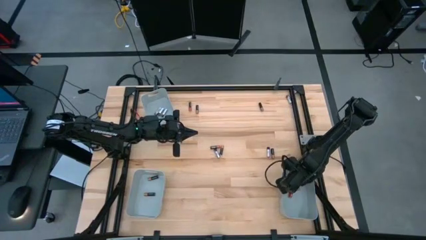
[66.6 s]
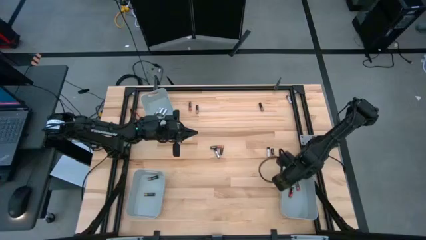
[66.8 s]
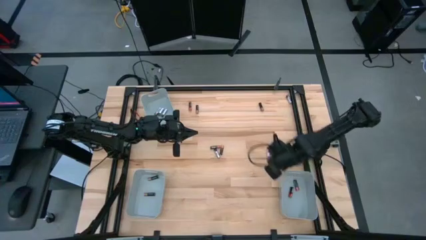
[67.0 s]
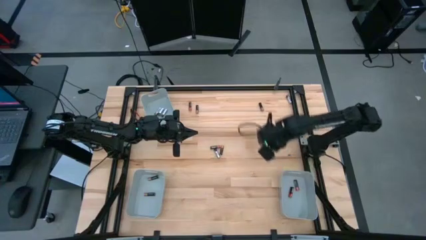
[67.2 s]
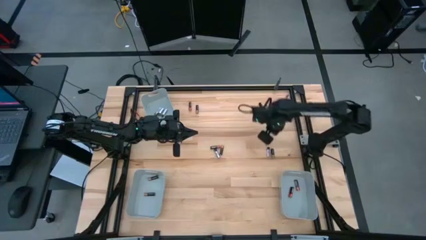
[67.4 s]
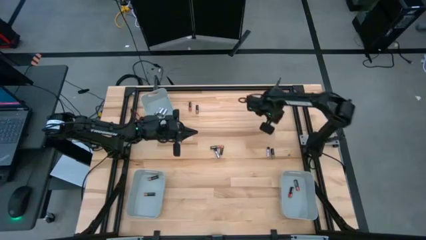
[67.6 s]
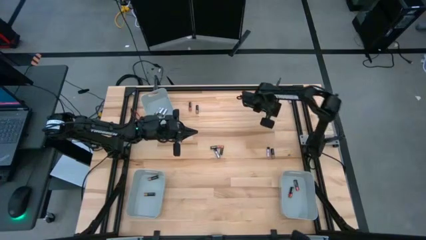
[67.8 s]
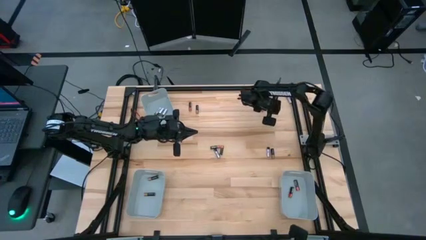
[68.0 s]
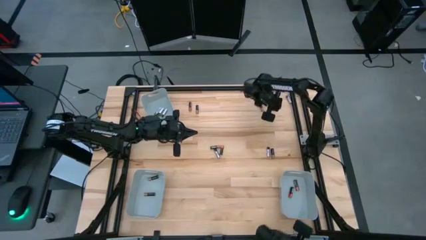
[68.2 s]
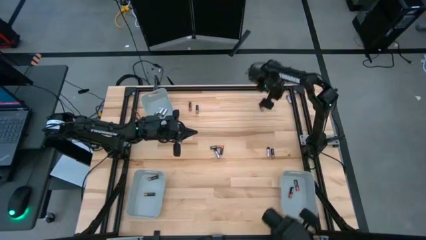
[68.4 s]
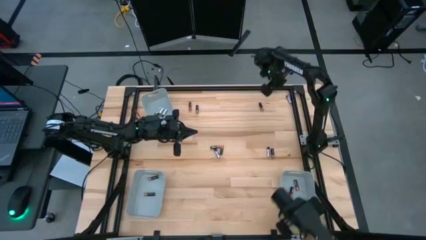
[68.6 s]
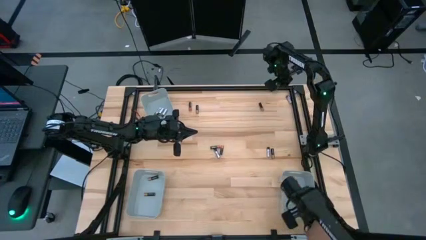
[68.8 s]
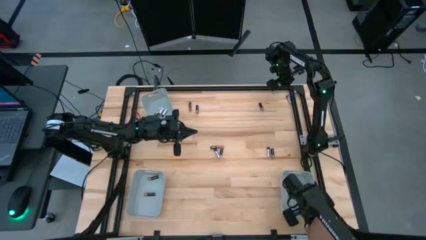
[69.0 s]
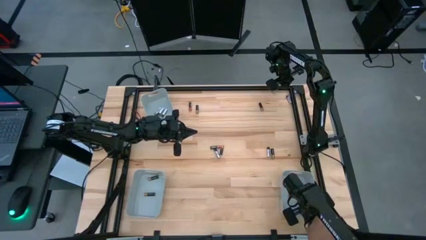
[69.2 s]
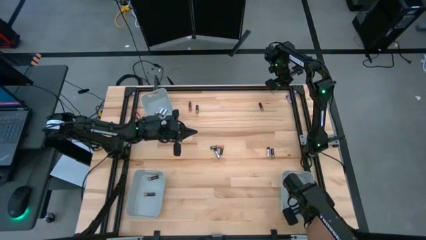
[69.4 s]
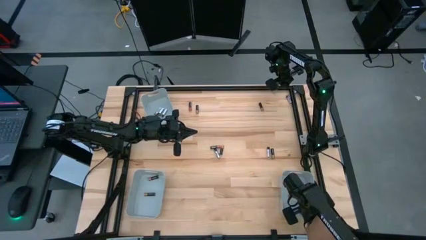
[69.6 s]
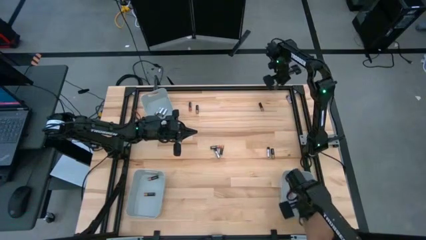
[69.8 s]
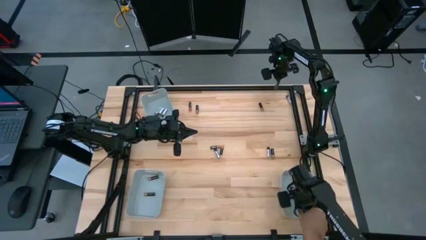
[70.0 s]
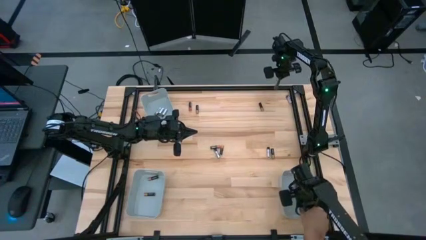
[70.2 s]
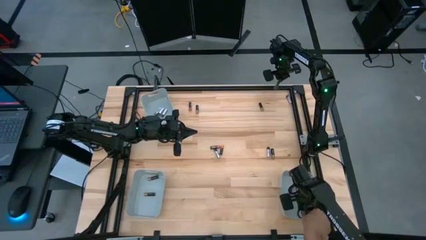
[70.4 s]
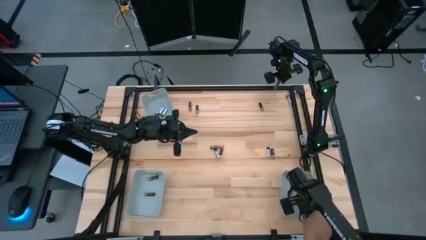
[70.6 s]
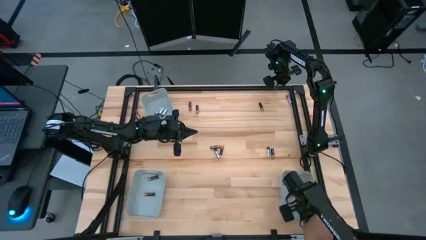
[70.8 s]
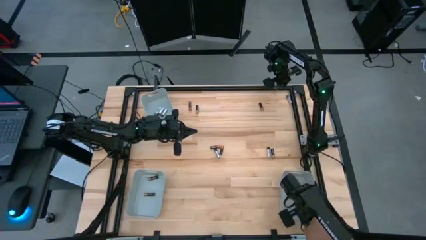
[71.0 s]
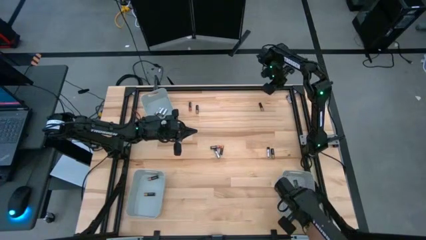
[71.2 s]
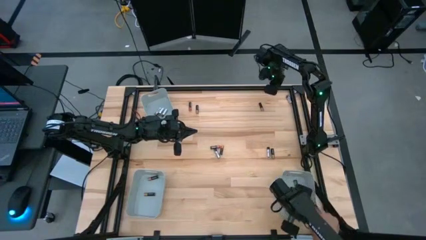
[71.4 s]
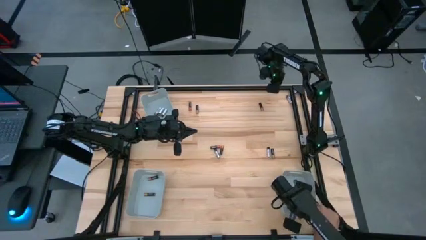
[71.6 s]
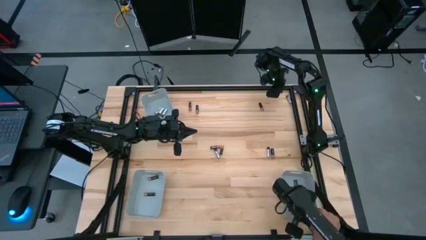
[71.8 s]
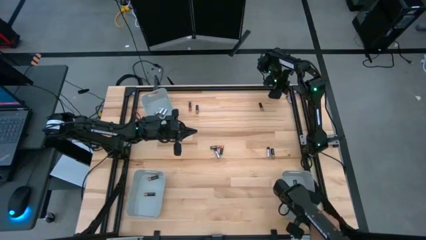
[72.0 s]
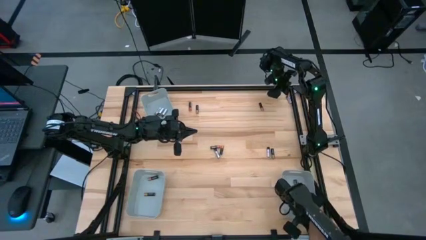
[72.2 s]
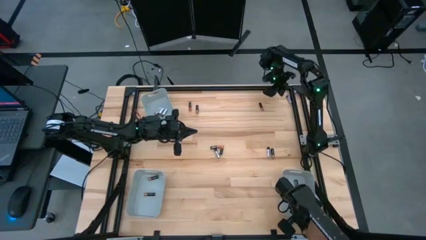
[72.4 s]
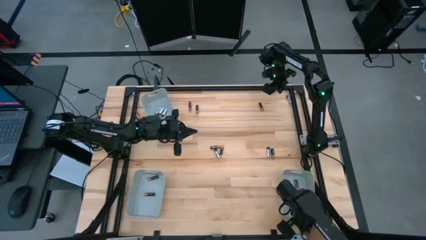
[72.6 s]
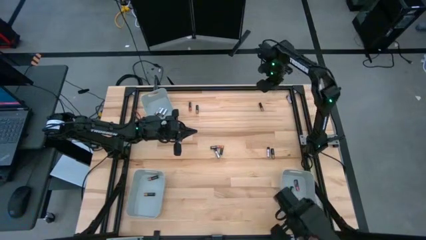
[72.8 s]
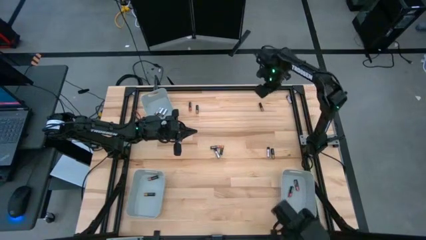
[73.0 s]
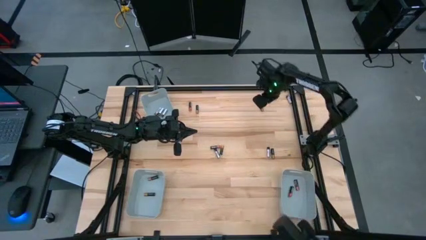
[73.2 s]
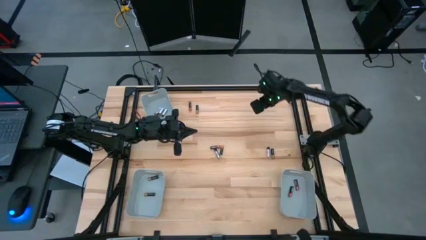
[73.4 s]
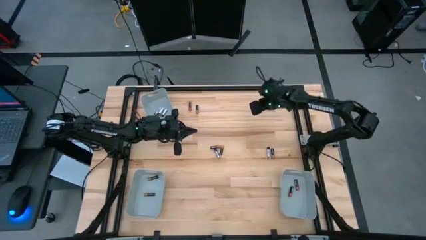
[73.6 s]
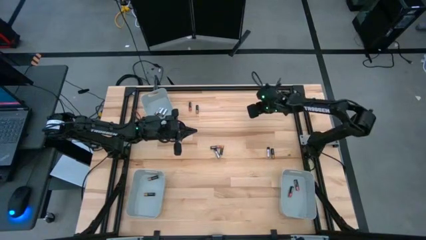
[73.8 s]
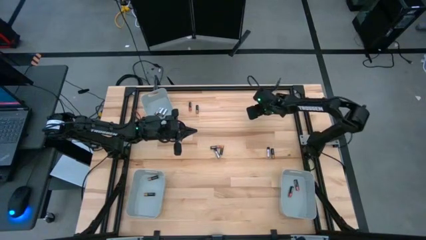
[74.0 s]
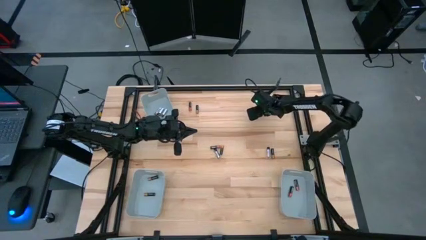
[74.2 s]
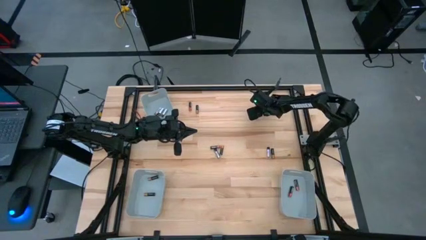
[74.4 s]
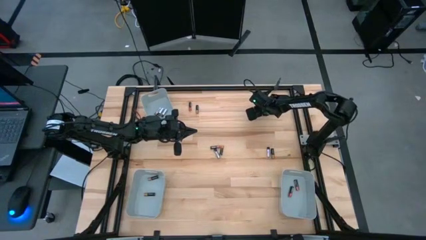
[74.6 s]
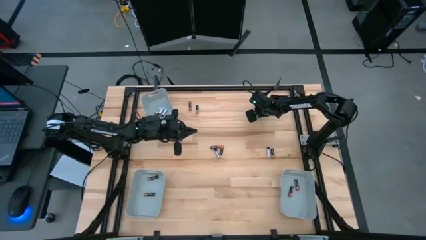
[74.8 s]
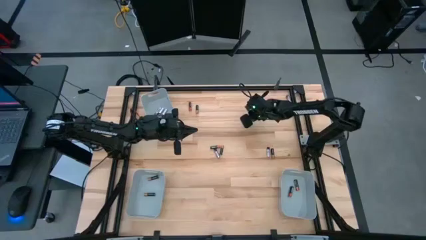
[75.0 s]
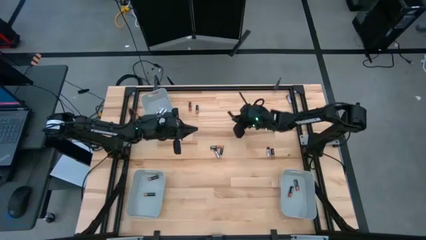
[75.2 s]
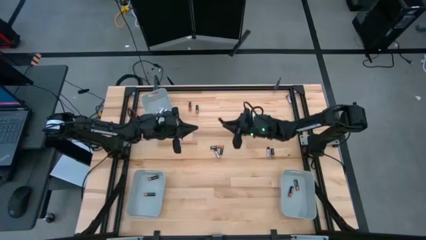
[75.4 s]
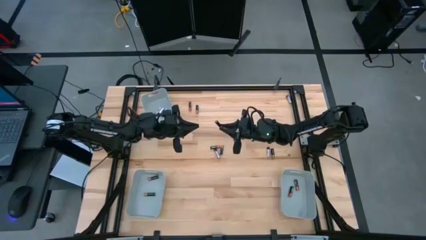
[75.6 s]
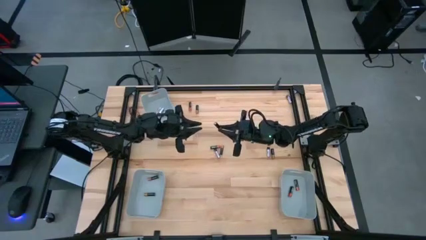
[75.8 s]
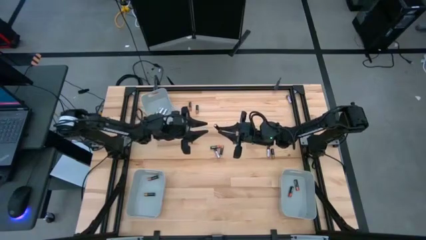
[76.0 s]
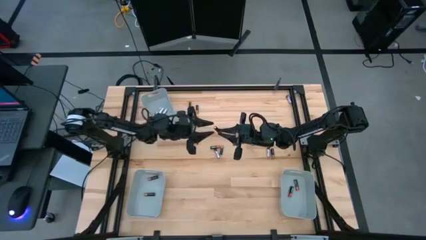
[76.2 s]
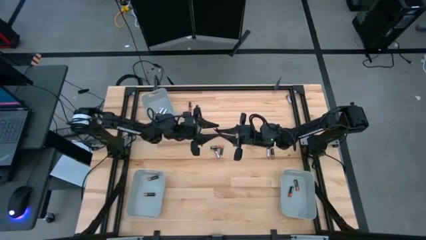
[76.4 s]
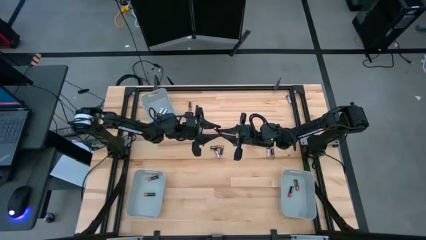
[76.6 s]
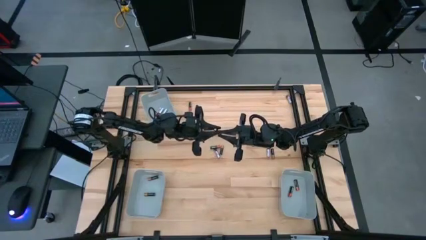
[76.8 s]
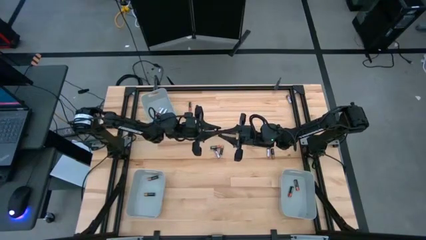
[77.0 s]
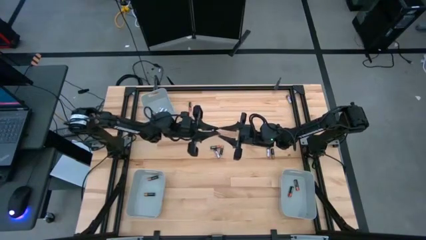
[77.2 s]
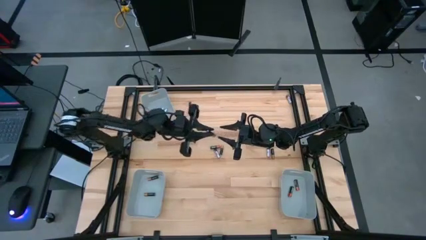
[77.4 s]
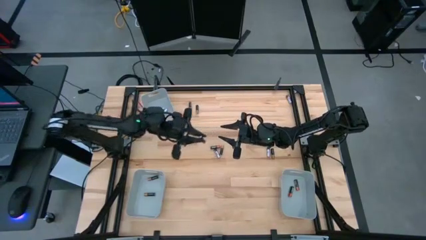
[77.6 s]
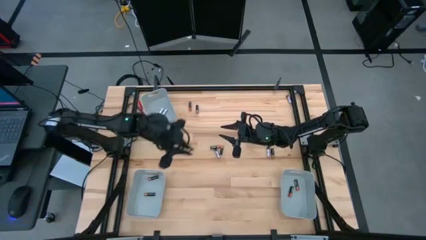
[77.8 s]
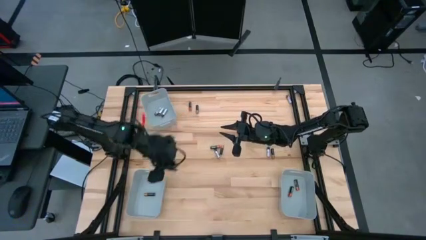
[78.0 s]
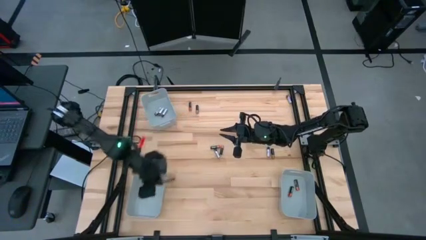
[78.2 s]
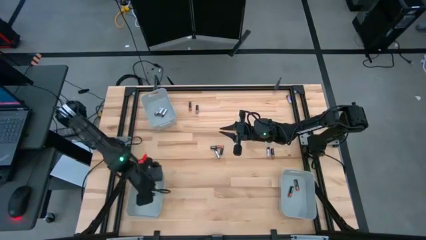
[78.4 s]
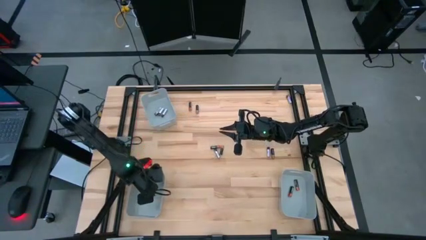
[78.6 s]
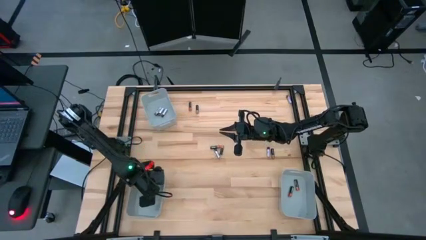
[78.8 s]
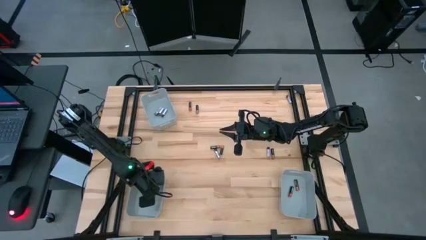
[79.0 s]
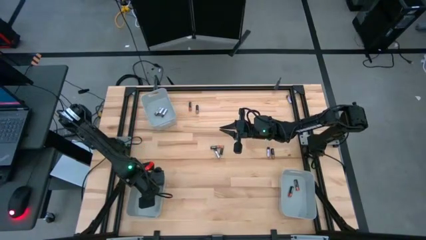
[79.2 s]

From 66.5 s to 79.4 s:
Task: Sort batteries
Put the black-brown battery into the bottom left gray bin

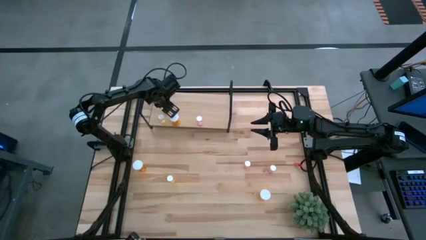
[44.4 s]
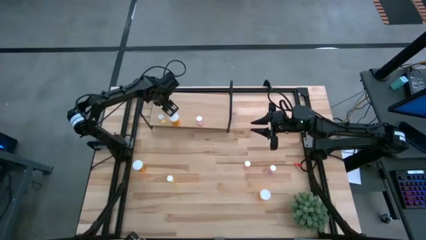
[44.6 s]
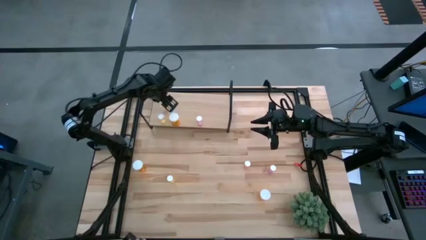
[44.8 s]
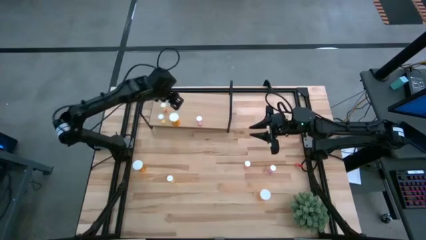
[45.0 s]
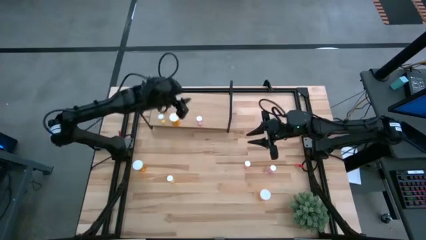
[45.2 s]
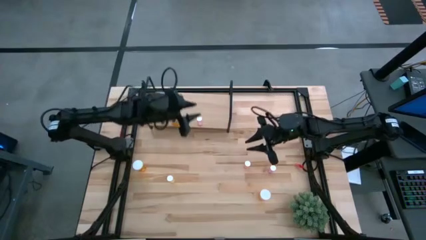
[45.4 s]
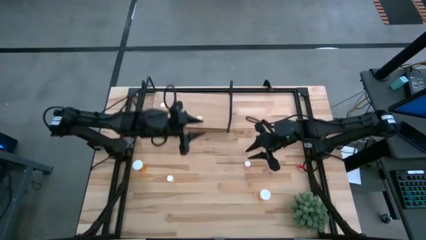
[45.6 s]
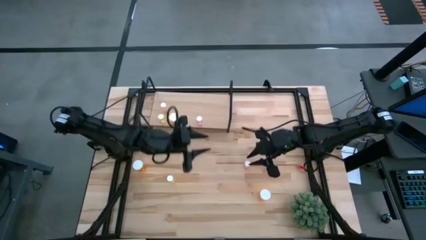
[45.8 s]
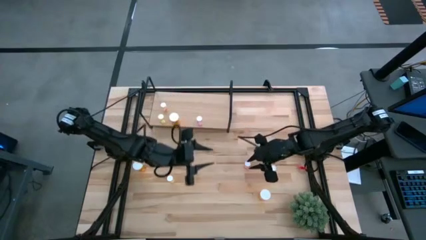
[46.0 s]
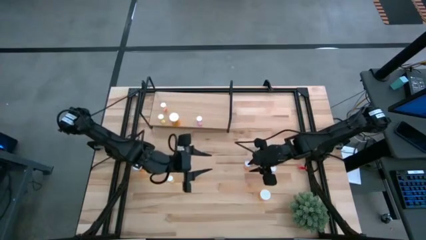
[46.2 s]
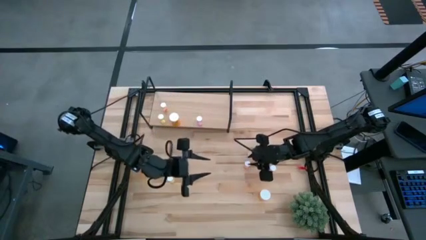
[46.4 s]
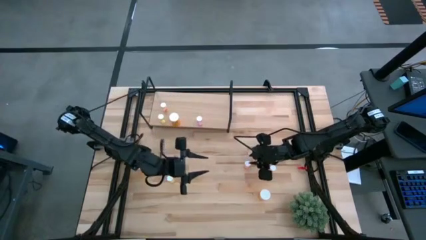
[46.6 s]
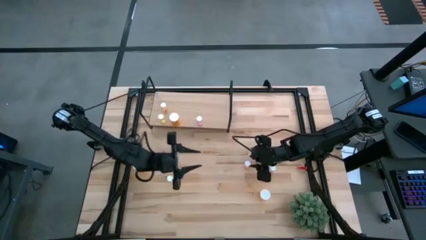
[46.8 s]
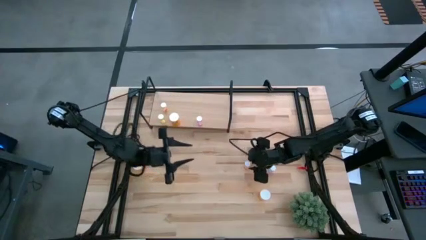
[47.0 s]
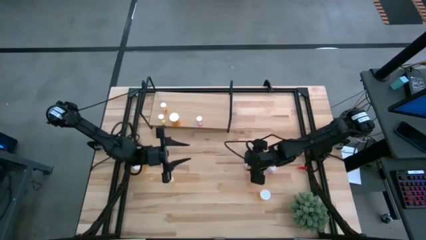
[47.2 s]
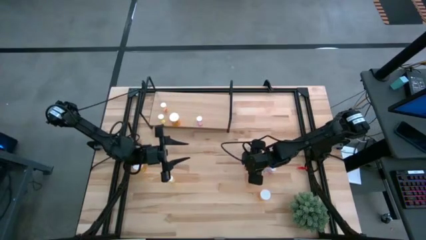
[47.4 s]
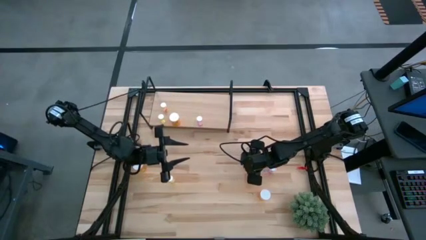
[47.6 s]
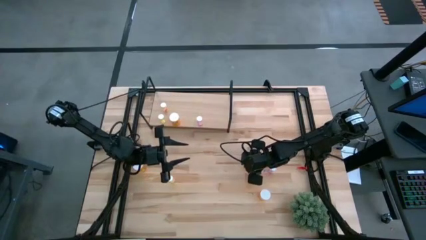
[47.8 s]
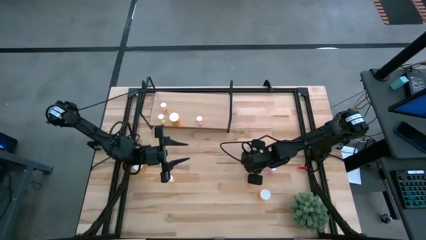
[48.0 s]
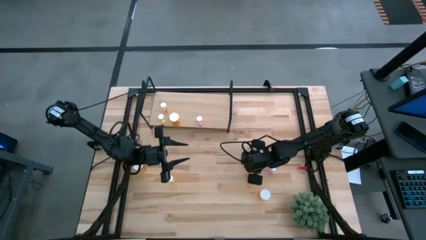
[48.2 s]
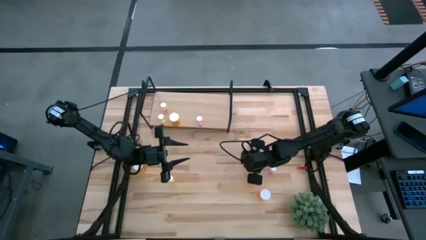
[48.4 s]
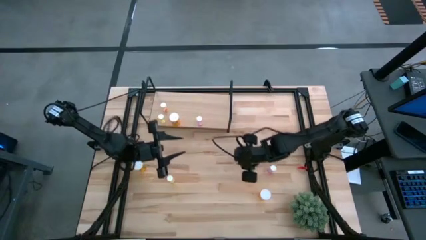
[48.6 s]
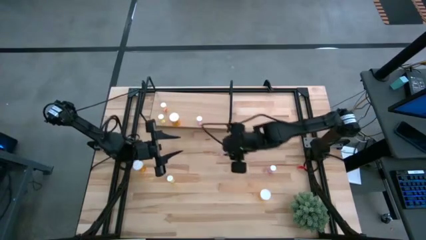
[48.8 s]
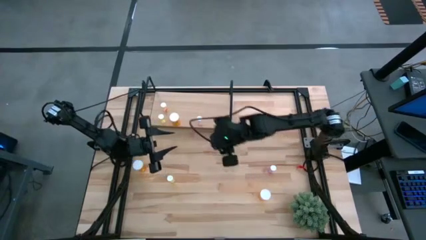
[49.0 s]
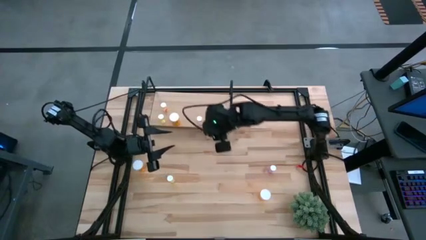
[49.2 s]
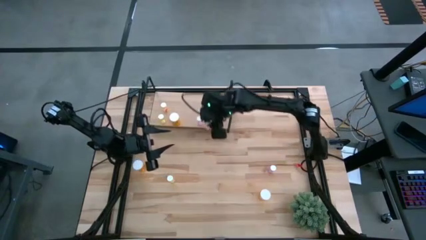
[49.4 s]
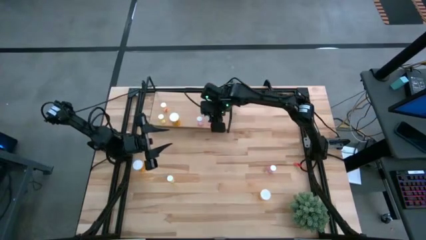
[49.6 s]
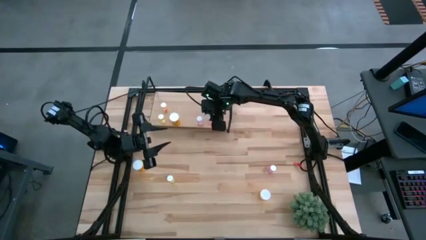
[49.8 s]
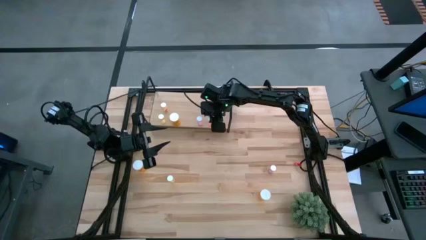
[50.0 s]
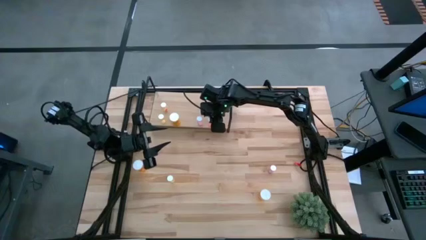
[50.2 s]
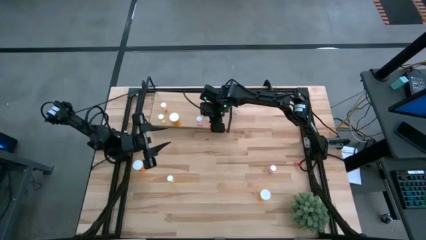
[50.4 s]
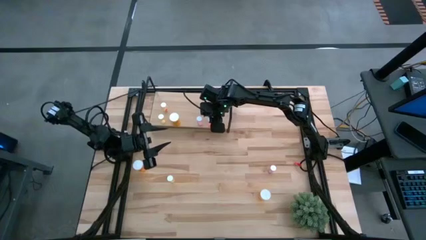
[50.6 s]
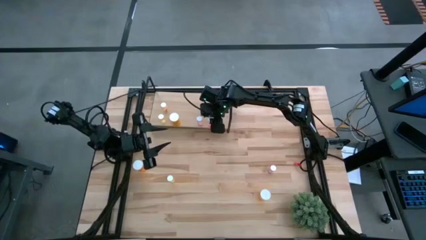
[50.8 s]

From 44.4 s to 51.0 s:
Task: Pick and place medicine bottles onto shelf by color
Put the pink pill bottle on the shelf
